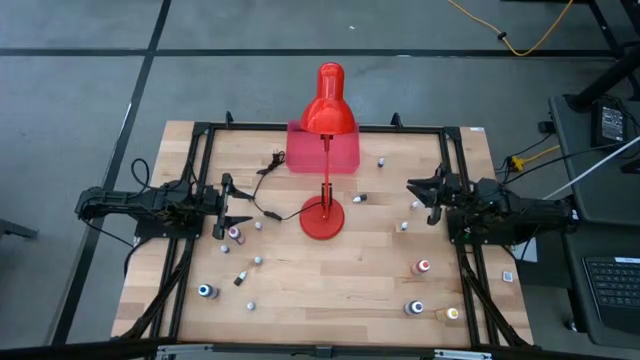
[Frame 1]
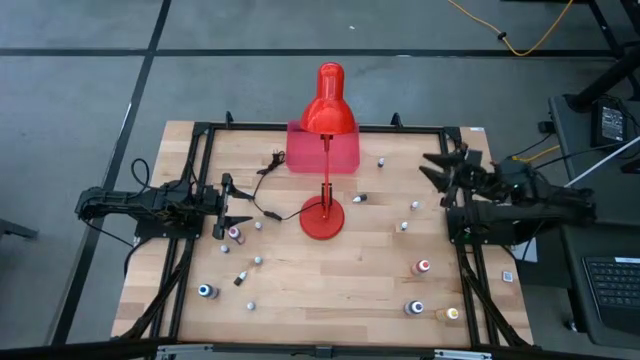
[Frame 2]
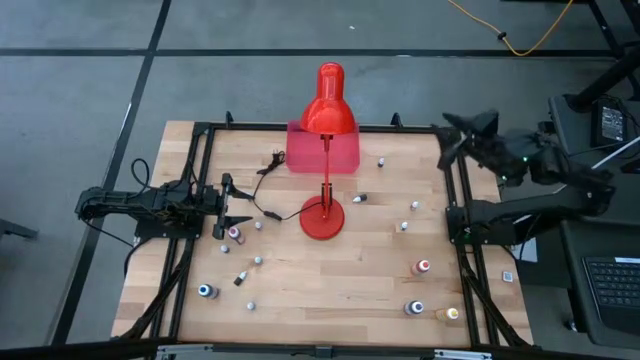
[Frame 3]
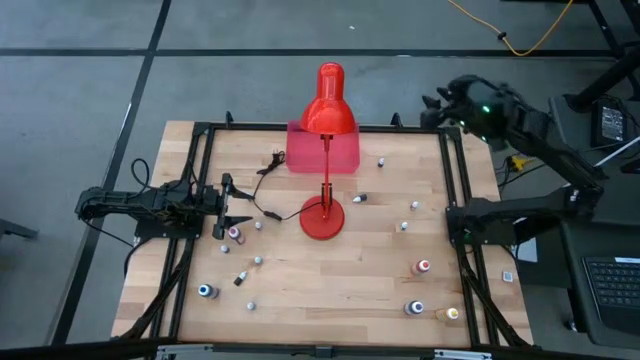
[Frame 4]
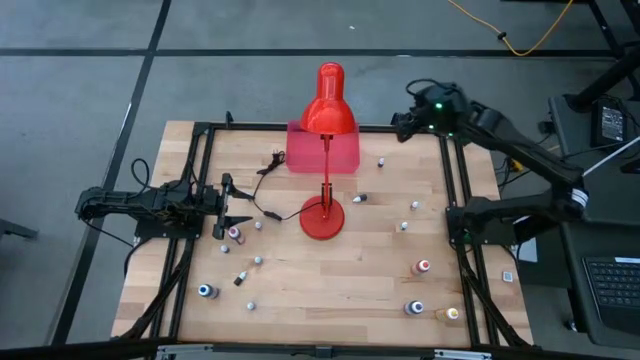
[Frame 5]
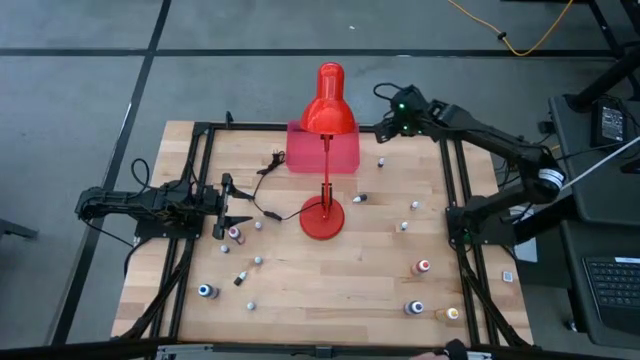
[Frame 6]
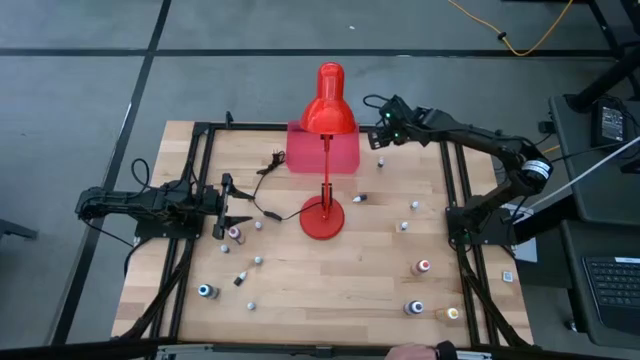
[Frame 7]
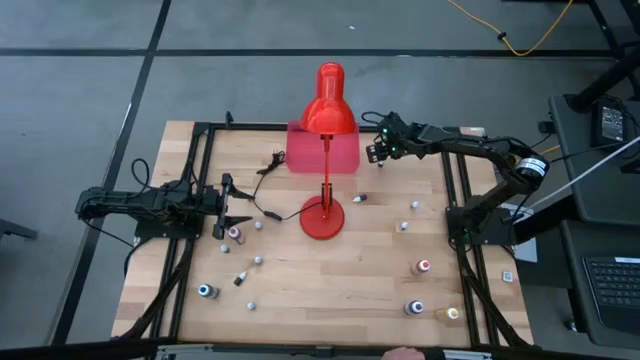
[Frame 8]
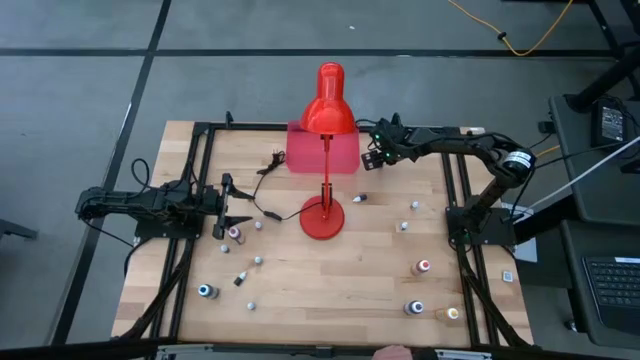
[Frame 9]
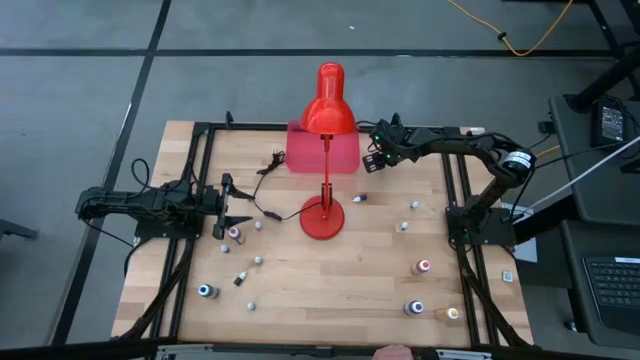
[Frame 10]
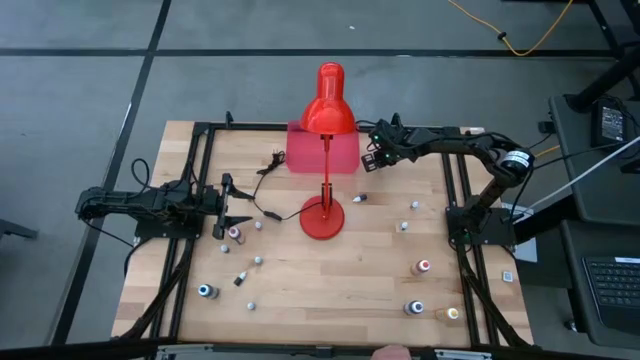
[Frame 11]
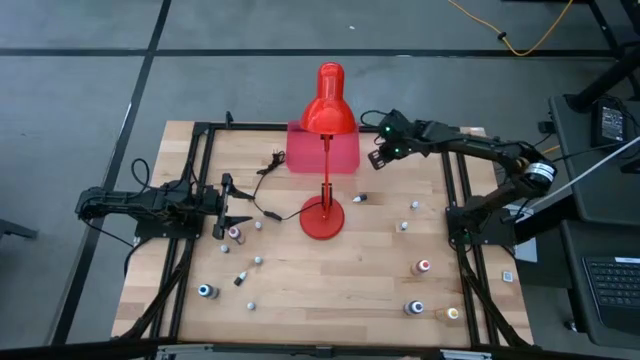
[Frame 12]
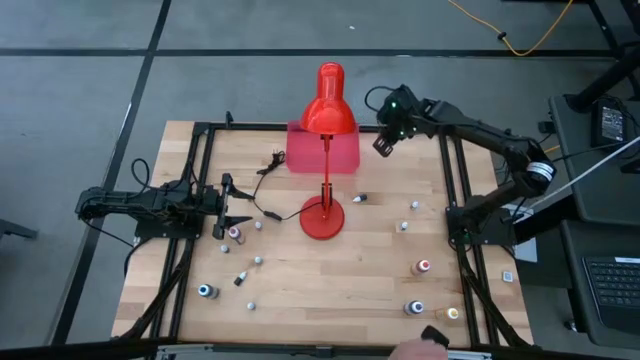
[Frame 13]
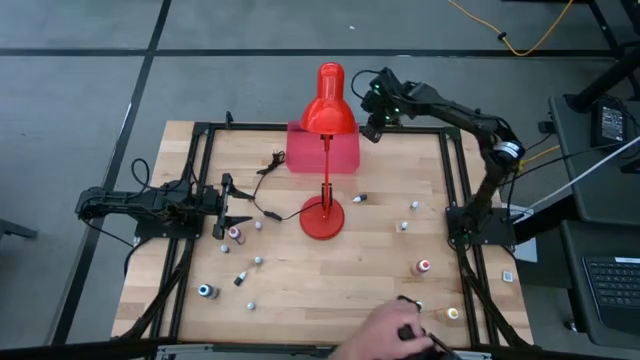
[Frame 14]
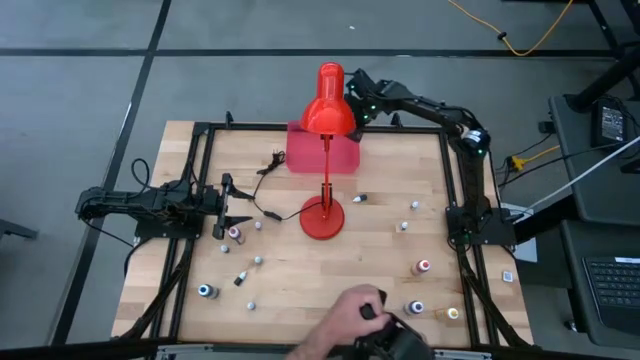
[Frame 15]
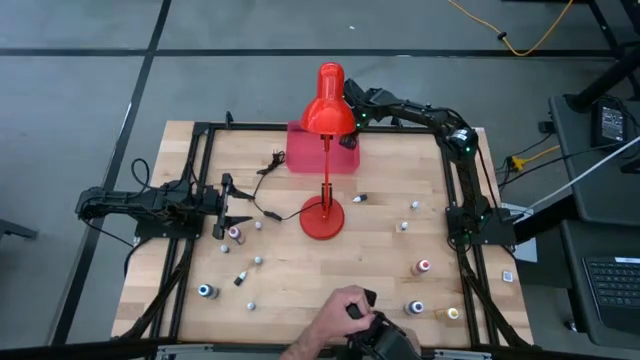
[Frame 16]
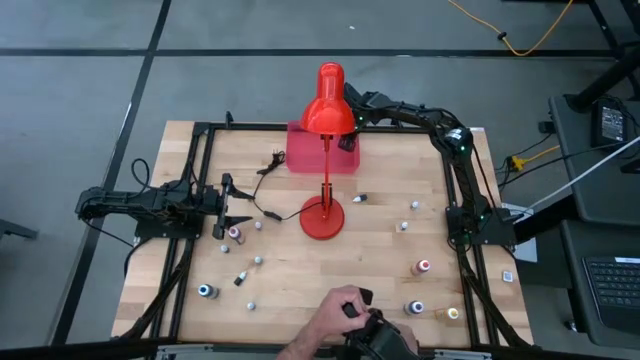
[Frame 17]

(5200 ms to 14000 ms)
Task: Pick & Place food coloring
Put the small black food coloring bottle into the red bin

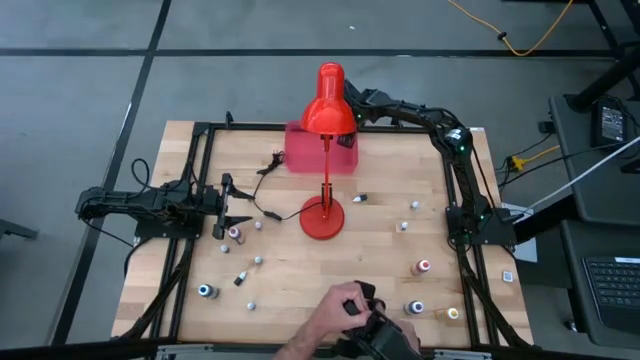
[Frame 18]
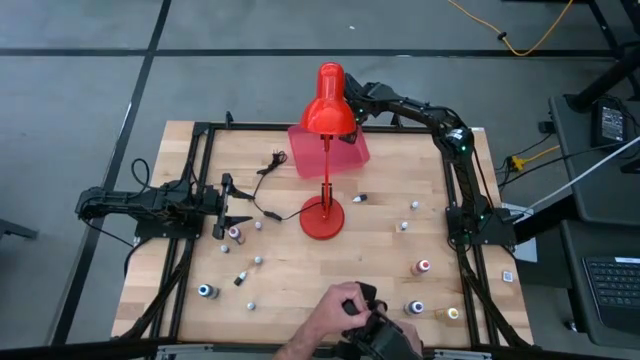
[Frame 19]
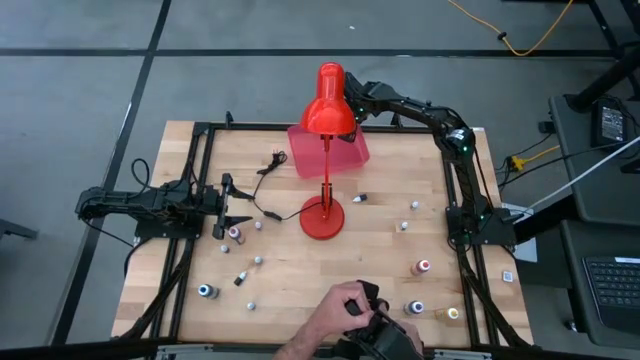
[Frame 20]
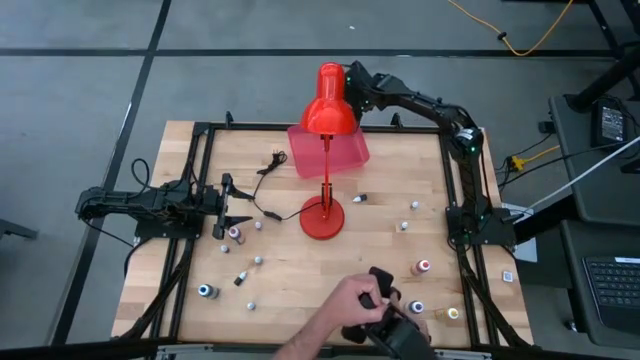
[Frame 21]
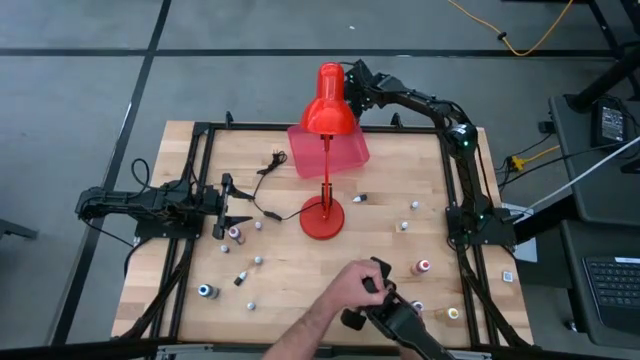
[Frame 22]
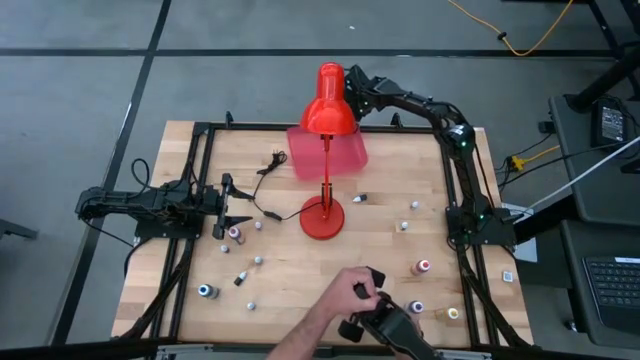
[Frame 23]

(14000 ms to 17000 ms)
Adjust the red bin

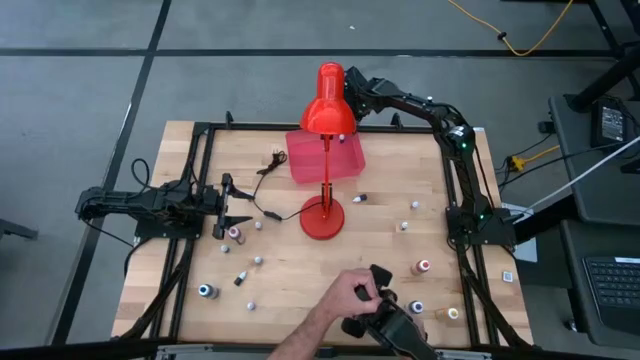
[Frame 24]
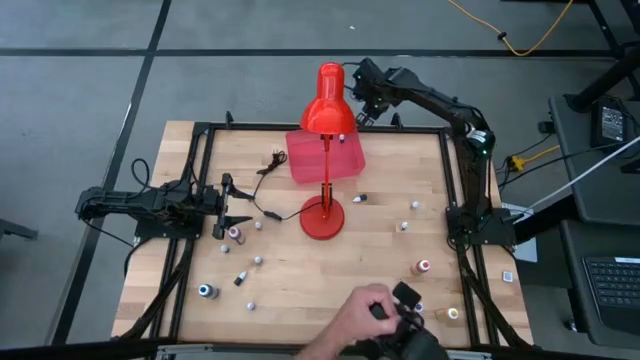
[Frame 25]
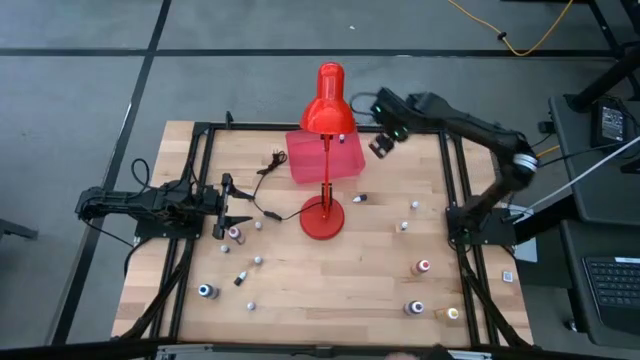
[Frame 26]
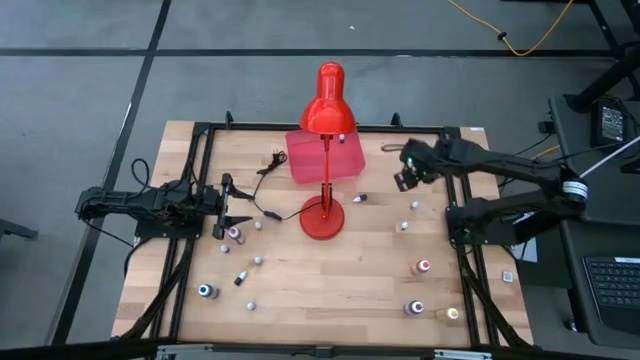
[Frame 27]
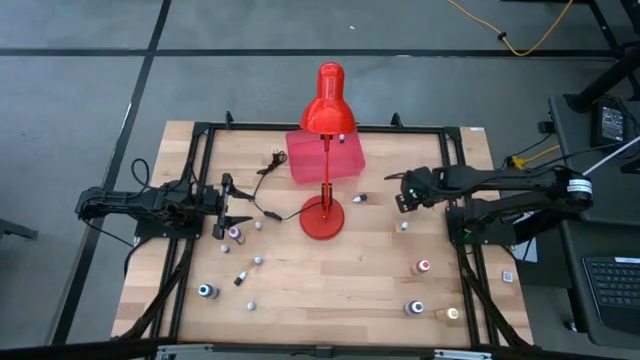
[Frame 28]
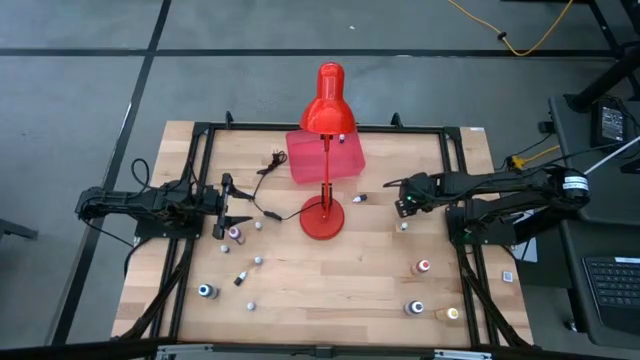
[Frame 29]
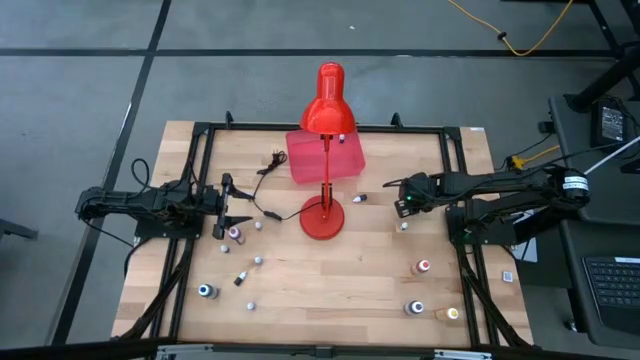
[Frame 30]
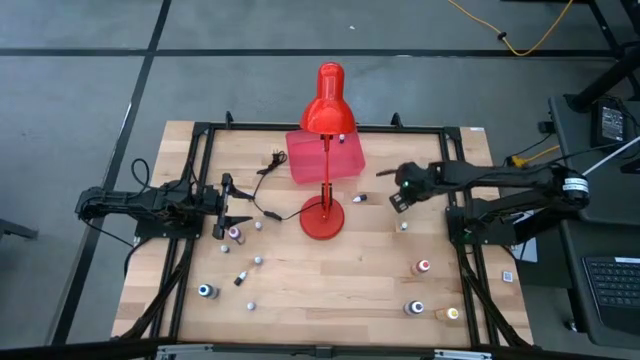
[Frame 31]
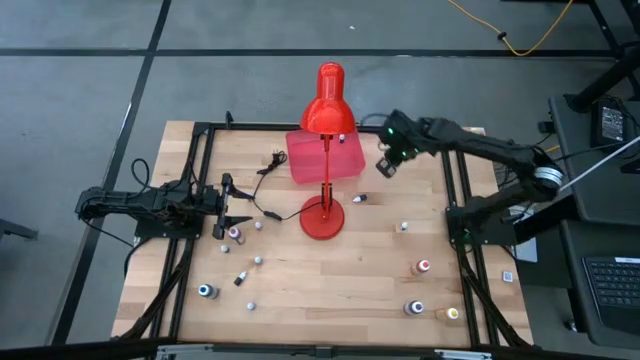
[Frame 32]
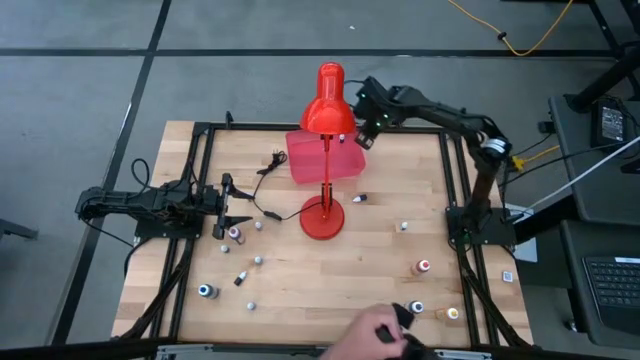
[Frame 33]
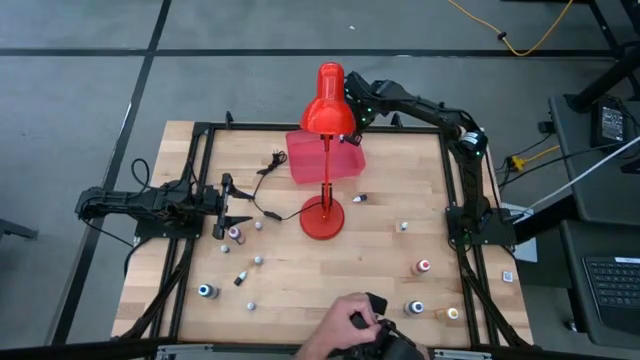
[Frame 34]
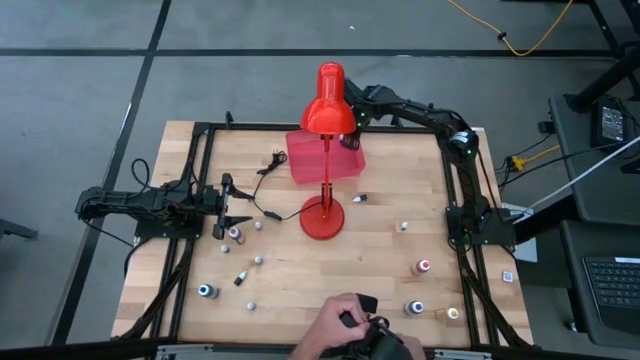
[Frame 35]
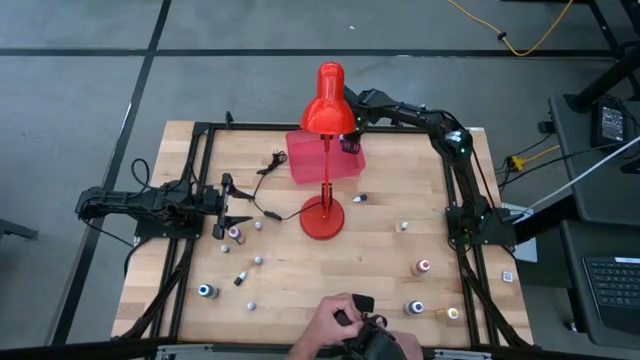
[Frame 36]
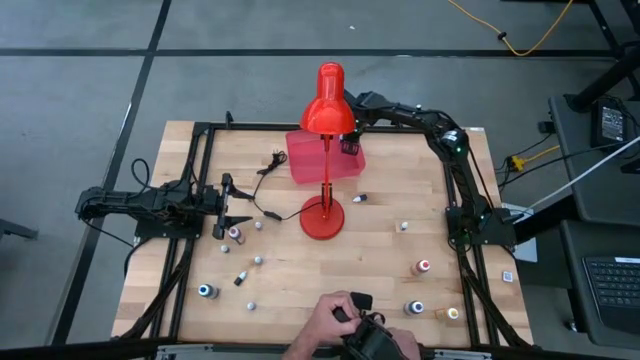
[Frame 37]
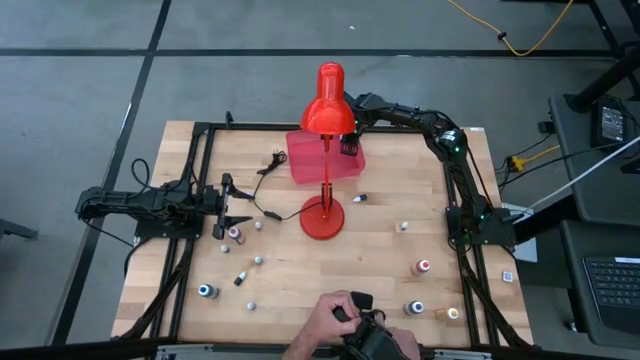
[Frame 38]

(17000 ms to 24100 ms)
Put the small red food coloring bottle into the red bin

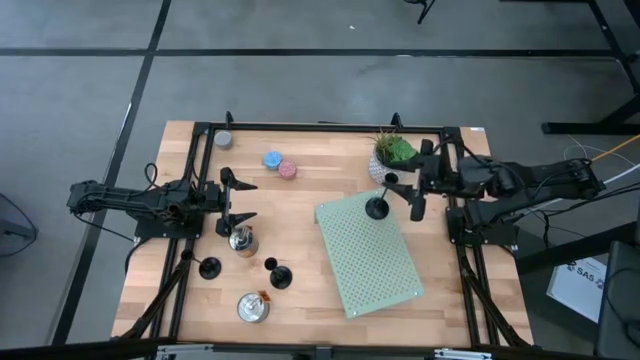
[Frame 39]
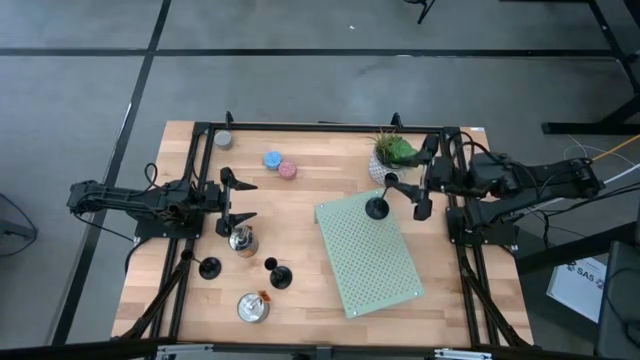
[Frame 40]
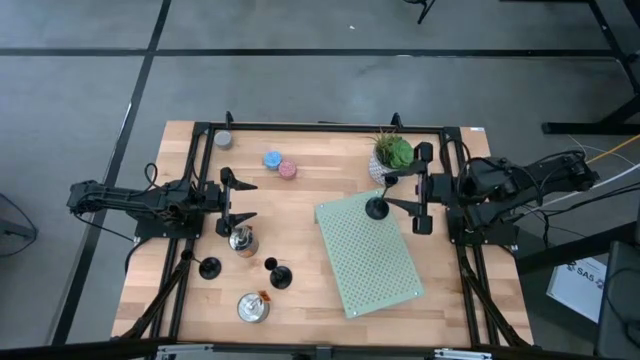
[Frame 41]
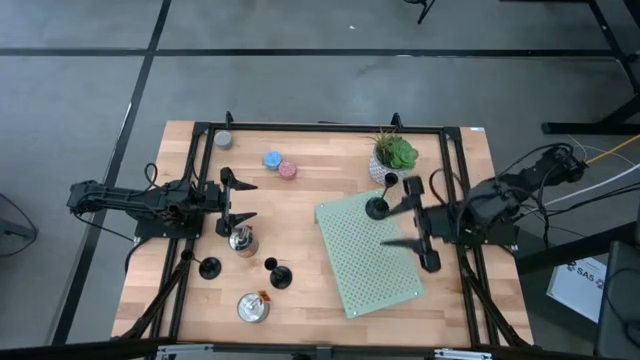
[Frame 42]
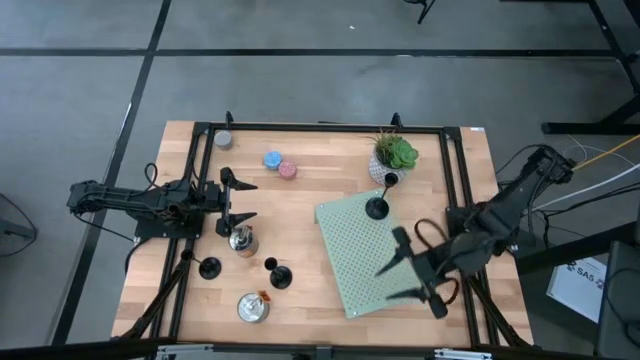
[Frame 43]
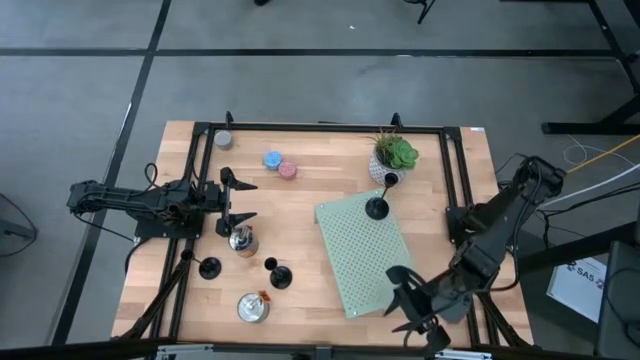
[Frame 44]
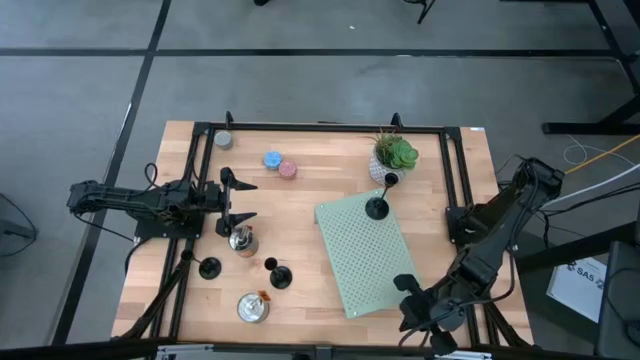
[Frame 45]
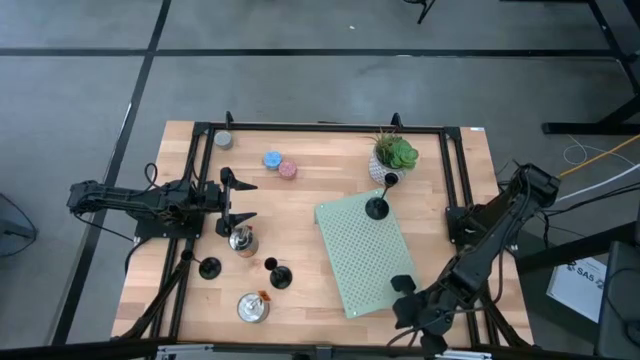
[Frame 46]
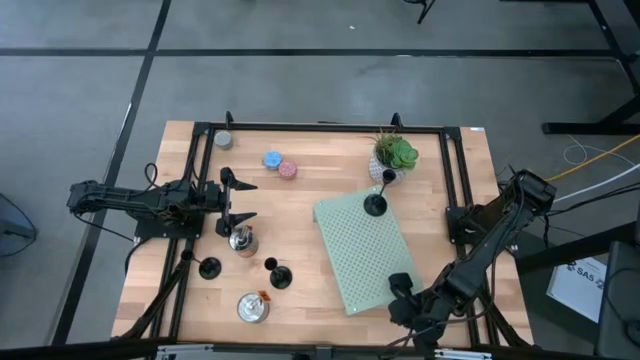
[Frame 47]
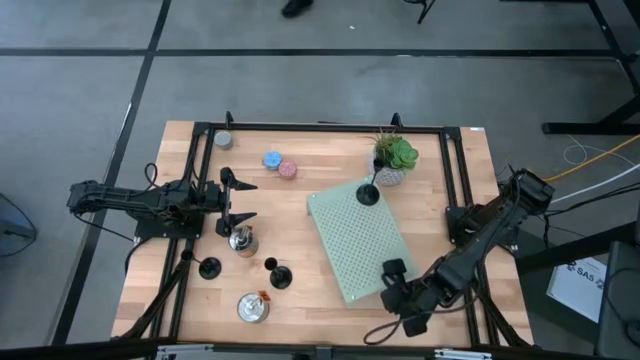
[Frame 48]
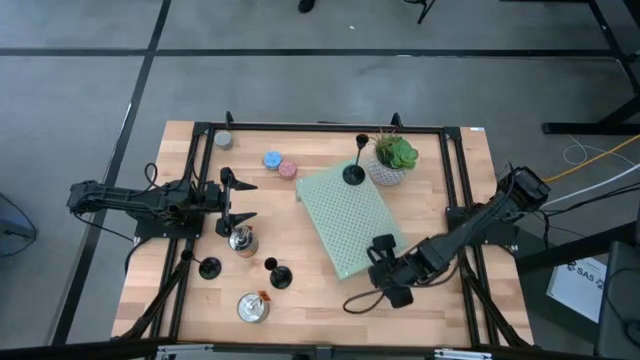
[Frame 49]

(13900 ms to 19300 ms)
Task: Pick & Place candle stick holders
Adjust the shelf
